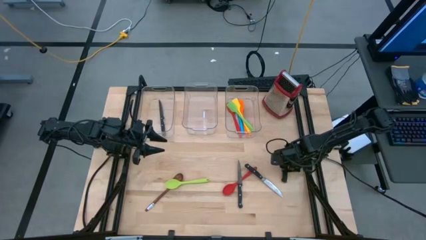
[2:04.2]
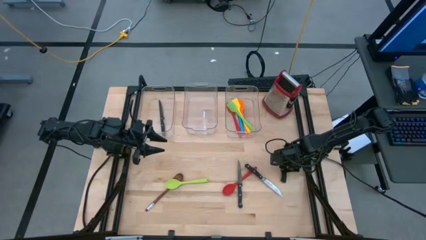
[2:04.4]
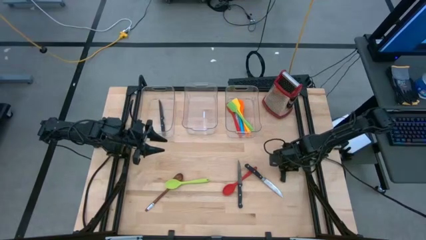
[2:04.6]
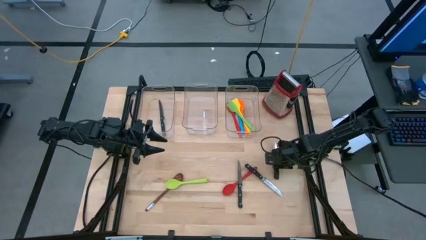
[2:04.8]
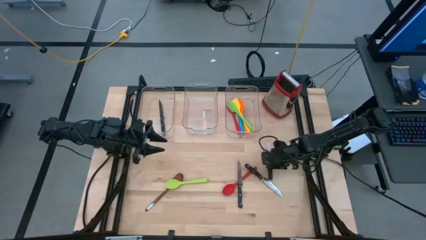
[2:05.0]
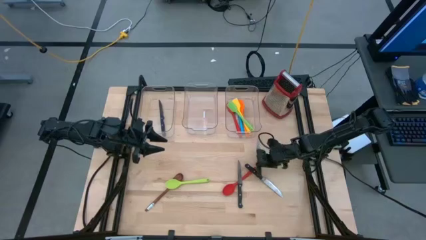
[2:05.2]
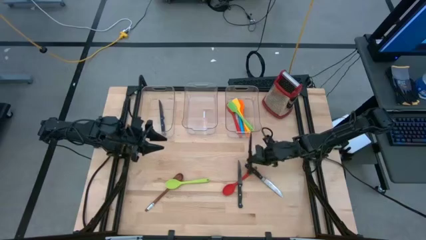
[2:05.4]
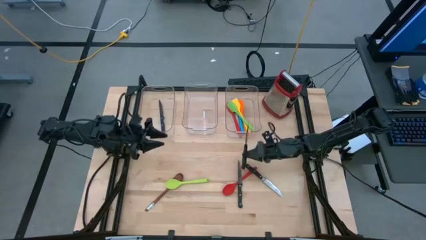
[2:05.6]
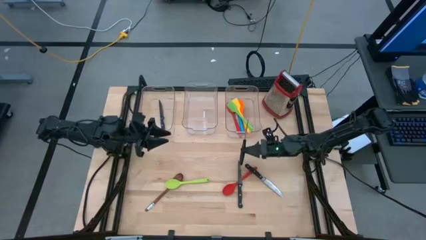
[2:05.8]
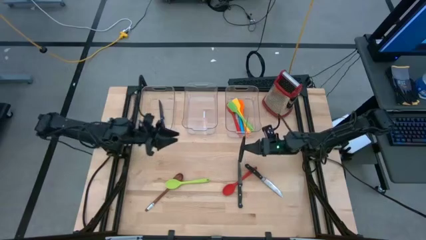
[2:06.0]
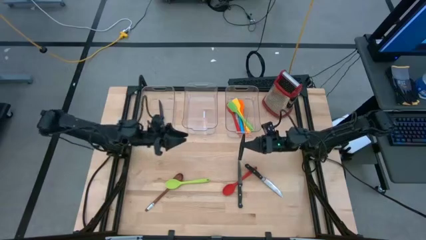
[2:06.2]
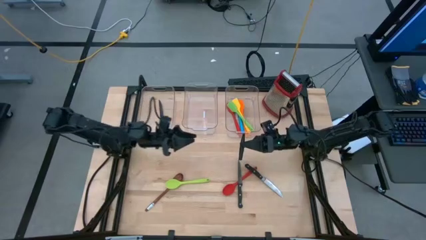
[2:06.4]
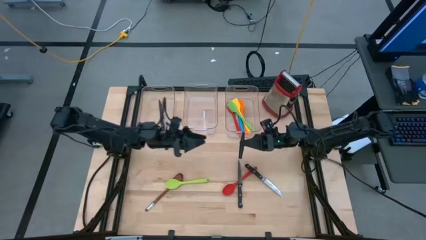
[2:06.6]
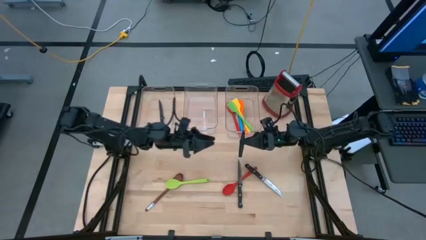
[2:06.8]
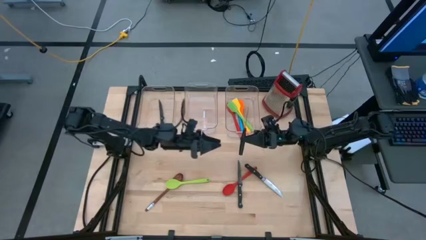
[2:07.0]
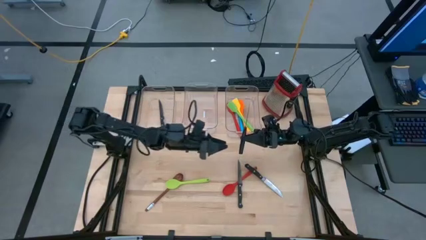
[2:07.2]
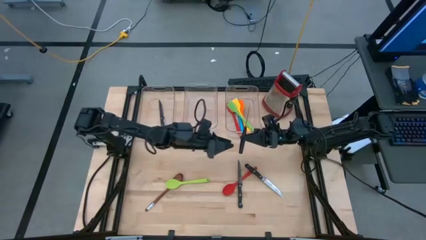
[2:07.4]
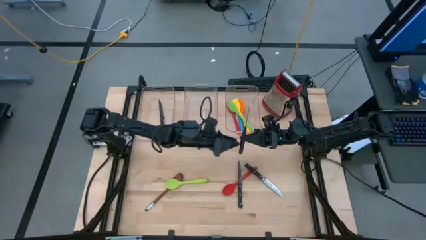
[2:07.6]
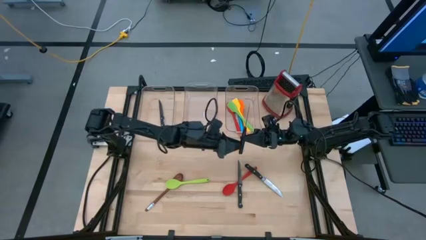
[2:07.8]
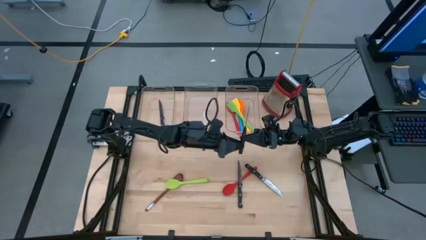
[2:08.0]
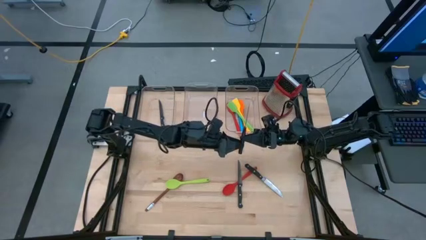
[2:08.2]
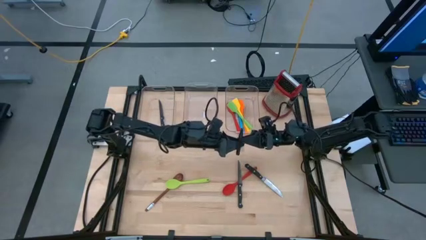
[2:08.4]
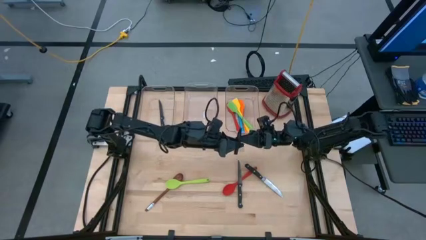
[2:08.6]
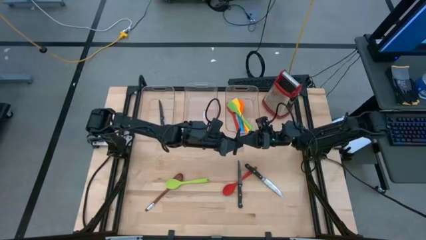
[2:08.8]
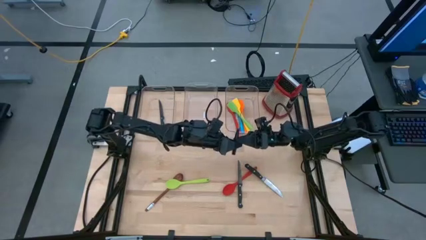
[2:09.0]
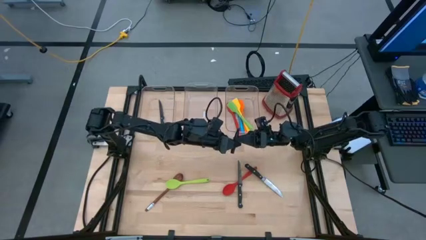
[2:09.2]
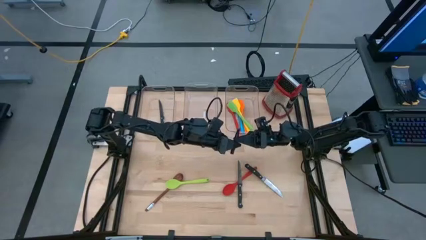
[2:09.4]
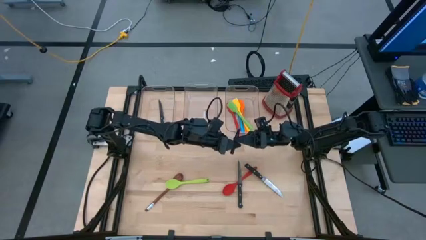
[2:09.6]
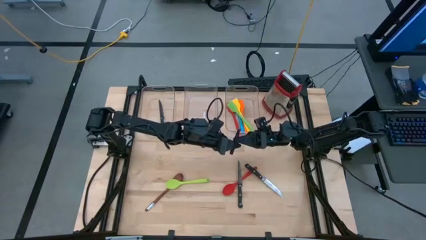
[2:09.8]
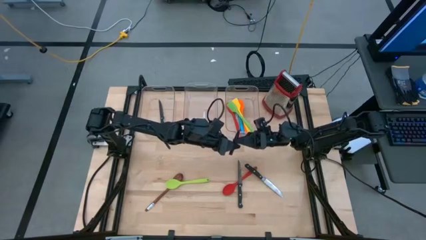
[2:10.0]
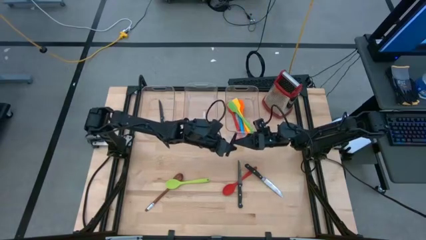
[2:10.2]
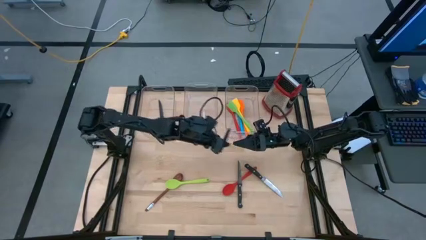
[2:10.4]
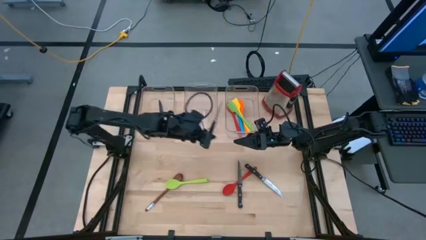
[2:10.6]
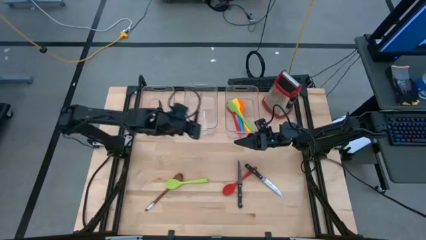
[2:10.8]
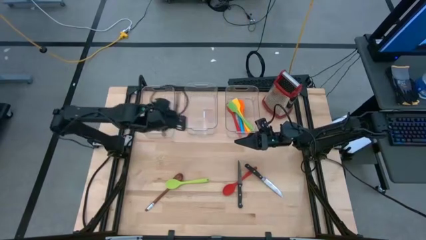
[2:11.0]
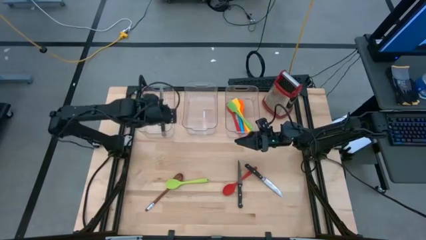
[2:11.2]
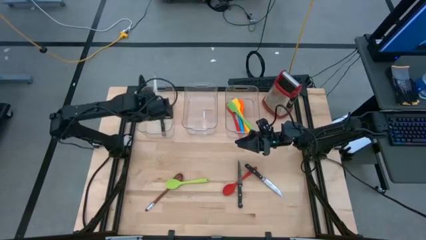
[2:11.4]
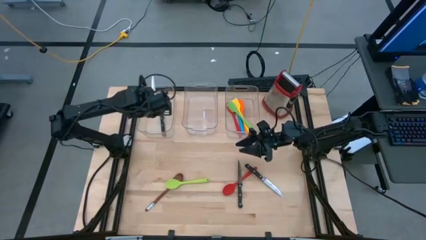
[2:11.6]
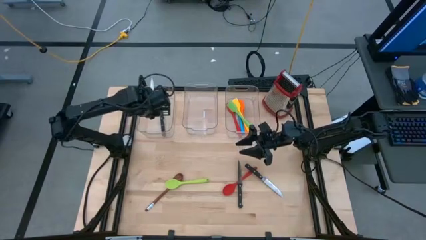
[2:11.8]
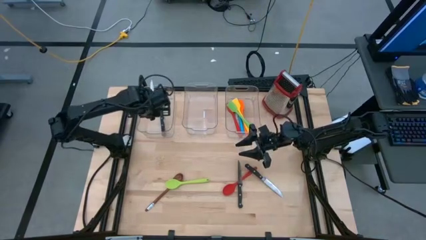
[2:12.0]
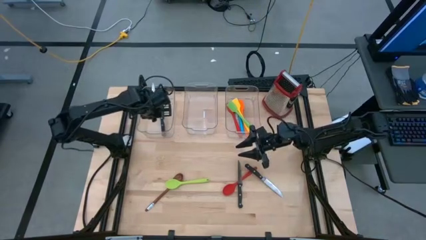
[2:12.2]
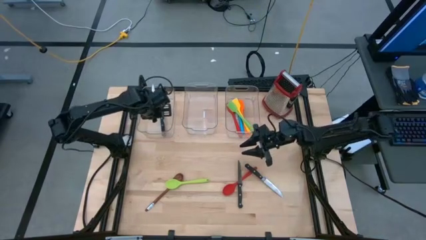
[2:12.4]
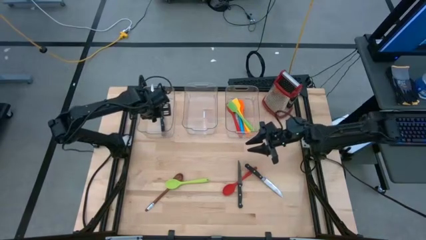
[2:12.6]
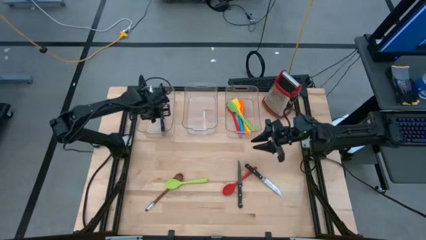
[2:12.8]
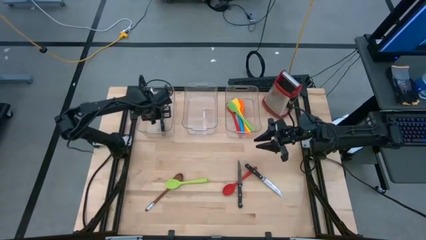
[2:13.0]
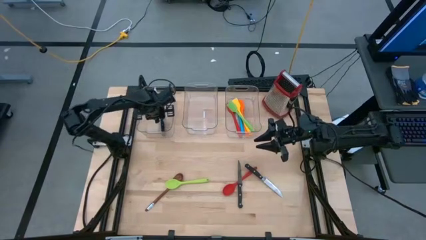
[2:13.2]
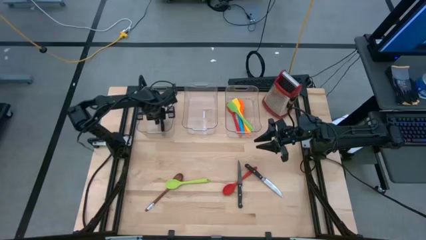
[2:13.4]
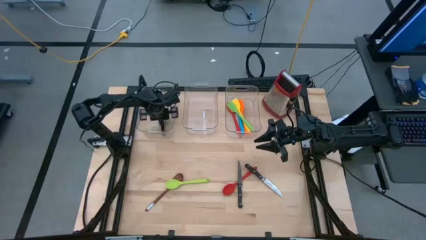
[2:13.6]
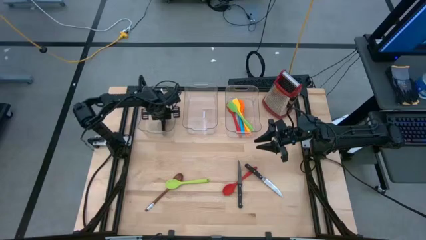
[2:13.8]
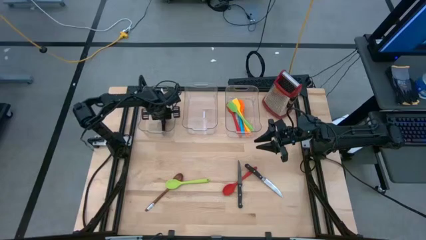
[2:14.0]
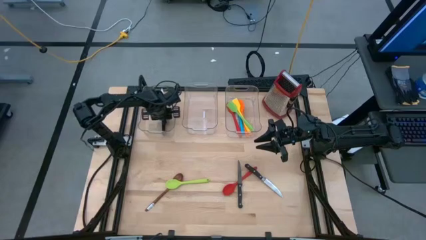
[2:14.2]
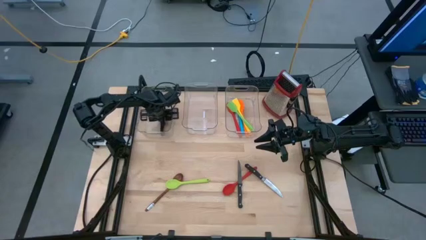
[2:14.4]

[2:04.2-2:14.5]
Task: Pick & Place Kitchen Items
Put the black knife into the left transparent bin
